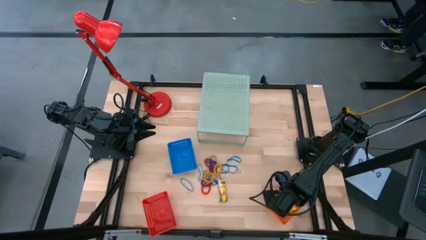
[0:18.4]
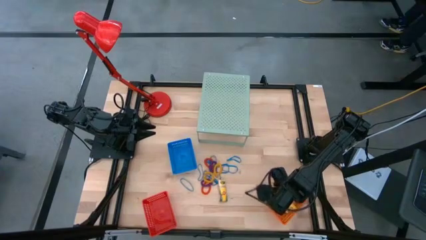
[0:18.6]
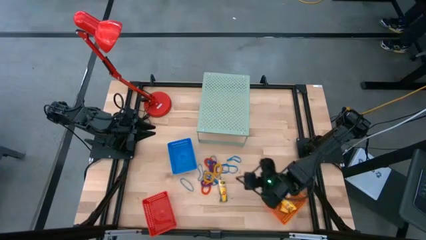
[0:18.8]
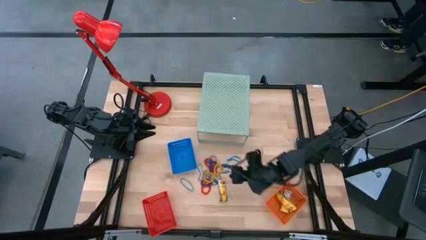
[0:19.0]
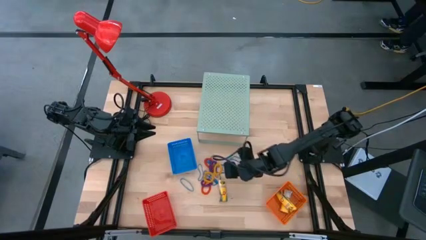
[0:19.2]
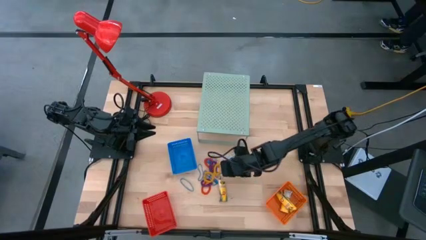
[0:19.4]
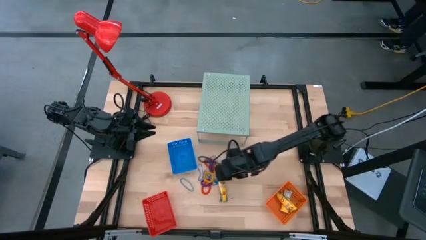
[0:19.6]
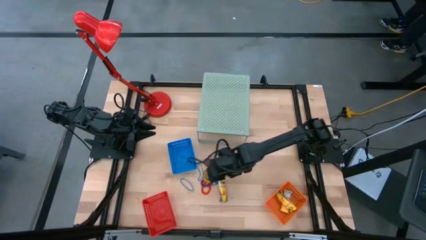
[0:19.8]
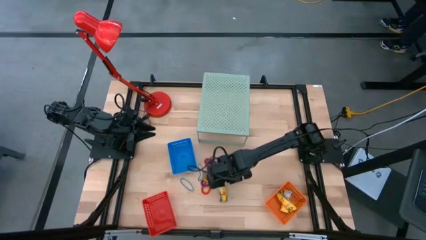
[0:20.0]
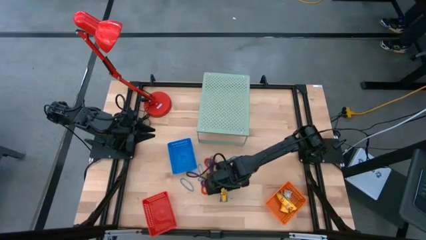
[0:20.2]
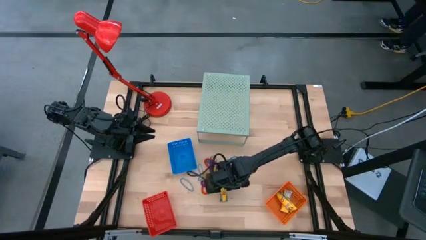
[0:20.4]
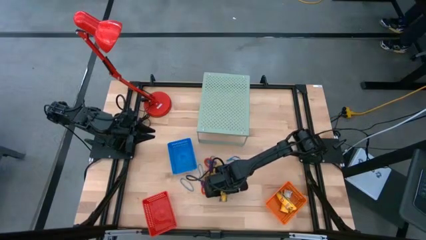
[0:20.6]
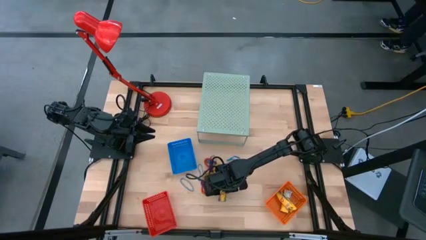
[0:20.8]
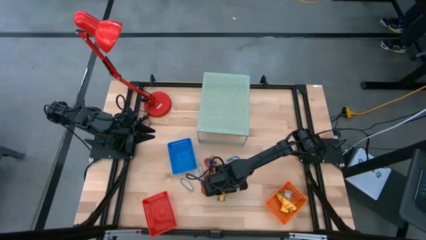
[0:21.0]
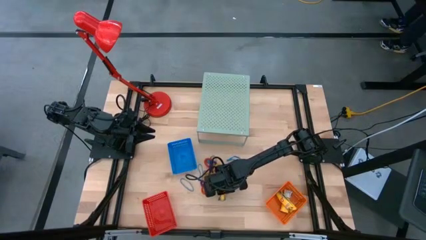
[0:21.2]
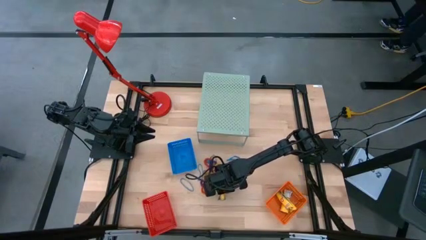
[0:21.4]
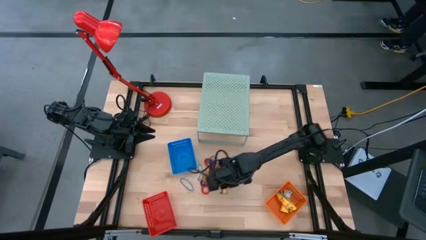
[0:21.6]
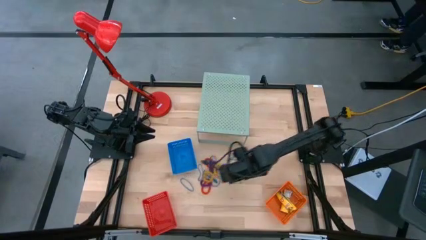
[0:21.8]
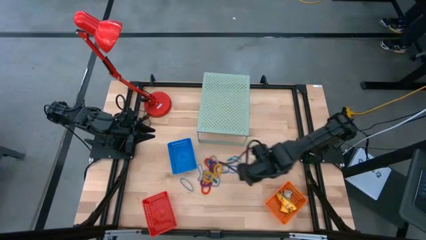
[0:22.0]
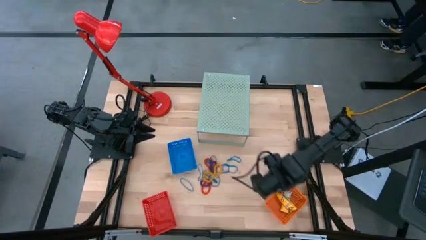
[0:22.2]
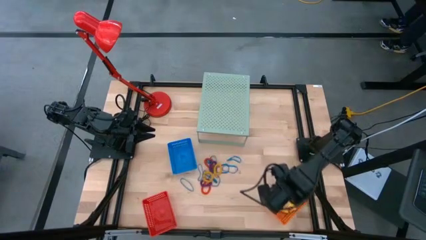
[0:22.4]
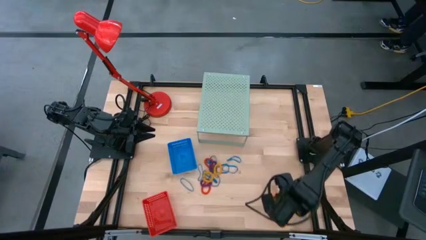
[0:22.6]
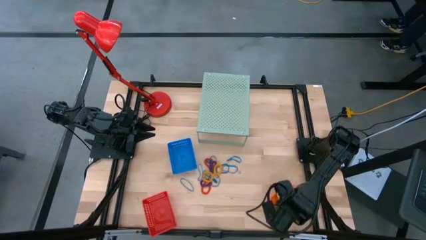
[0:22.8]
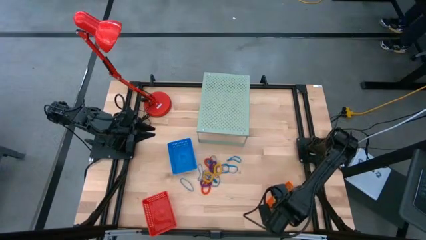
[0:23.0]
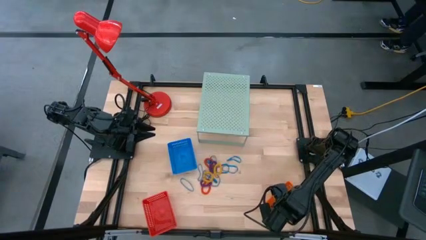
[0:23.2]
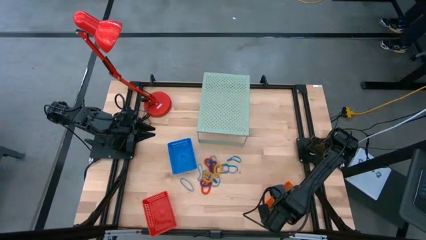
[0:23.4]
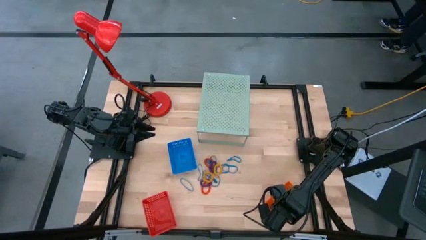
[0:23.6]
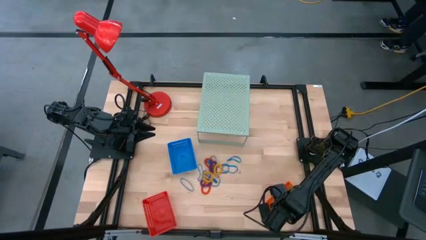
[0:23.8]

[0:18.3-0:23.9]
Task: Pick & Place Office Desk Supplies
Put the yellow crayon box into the orange basket

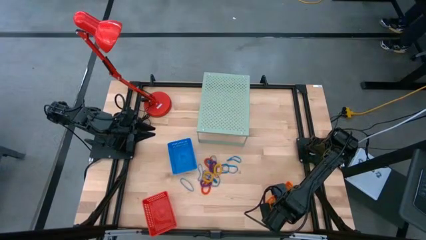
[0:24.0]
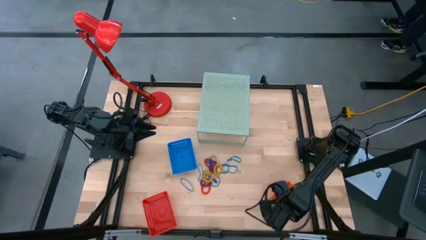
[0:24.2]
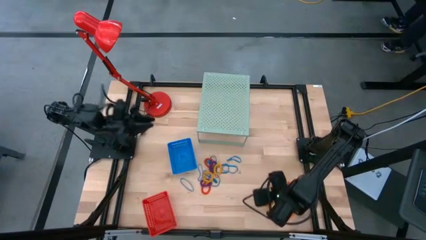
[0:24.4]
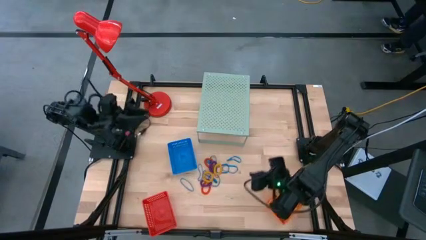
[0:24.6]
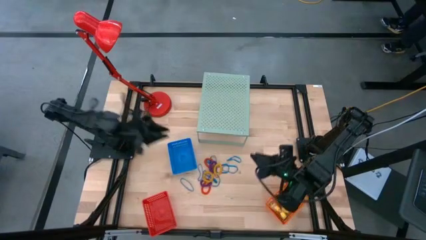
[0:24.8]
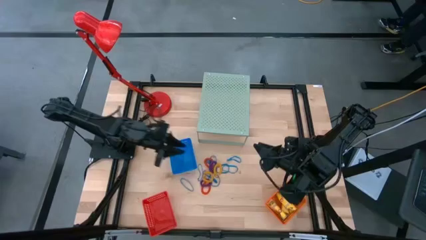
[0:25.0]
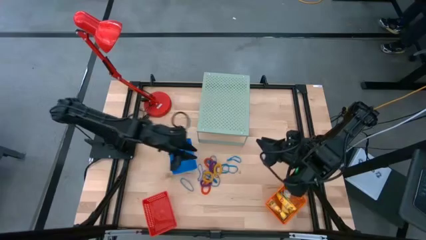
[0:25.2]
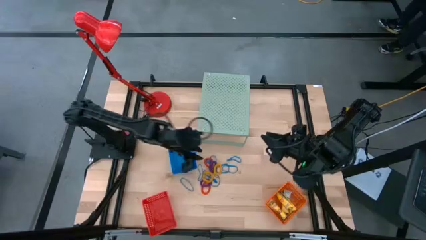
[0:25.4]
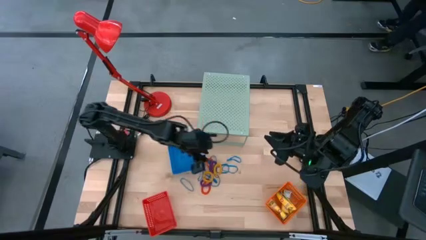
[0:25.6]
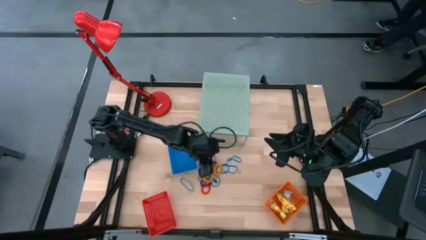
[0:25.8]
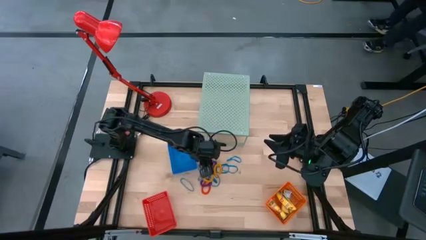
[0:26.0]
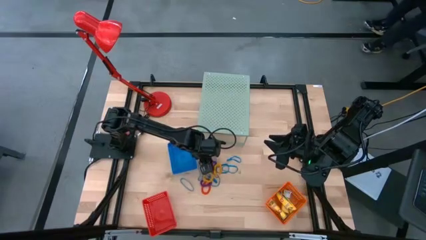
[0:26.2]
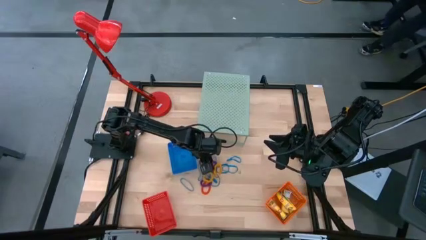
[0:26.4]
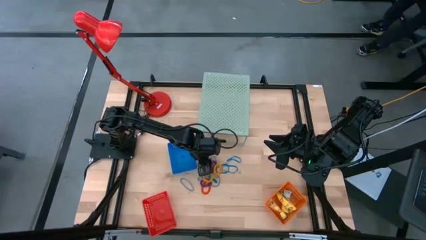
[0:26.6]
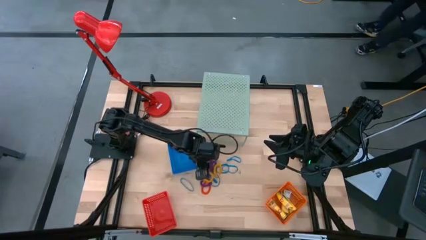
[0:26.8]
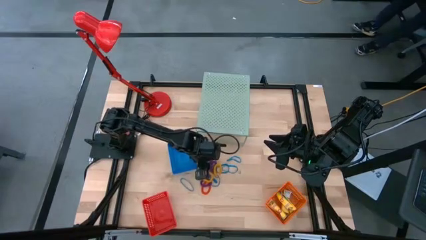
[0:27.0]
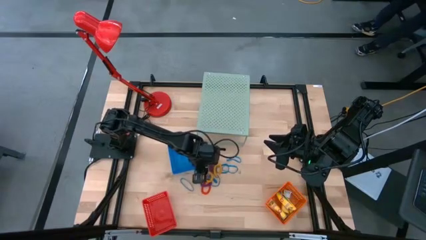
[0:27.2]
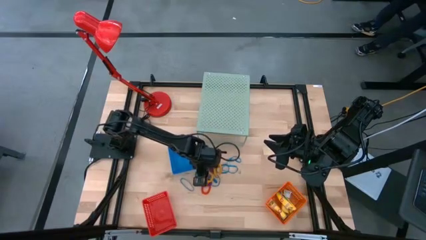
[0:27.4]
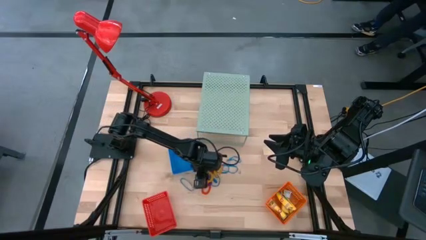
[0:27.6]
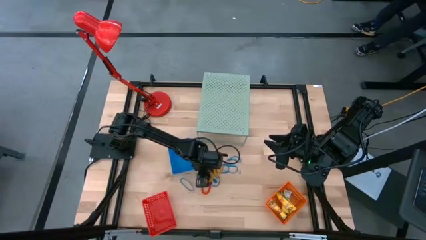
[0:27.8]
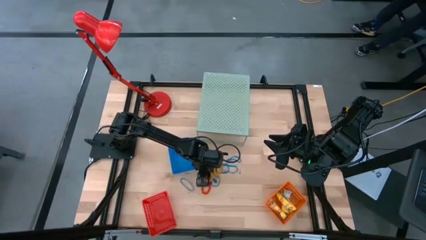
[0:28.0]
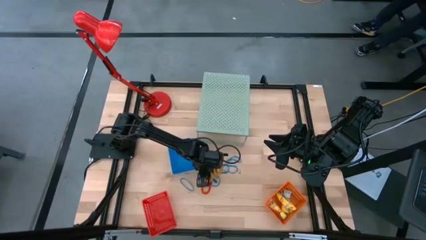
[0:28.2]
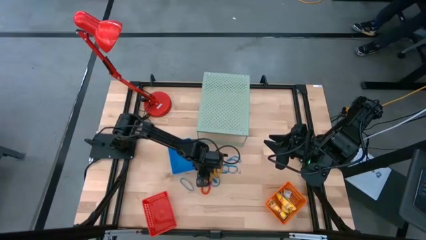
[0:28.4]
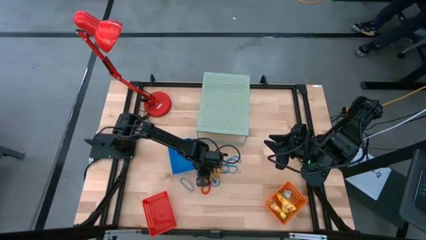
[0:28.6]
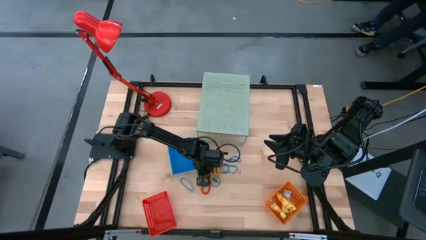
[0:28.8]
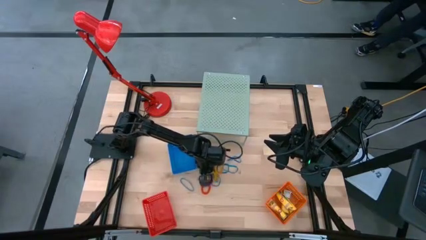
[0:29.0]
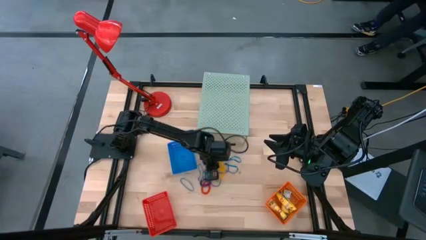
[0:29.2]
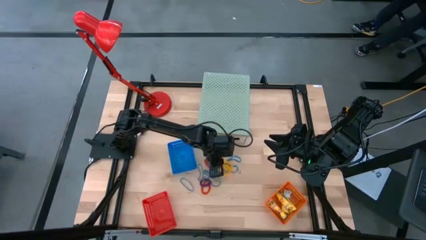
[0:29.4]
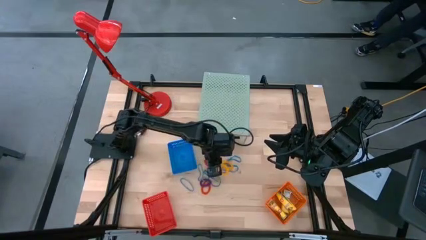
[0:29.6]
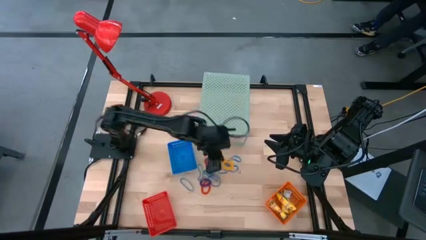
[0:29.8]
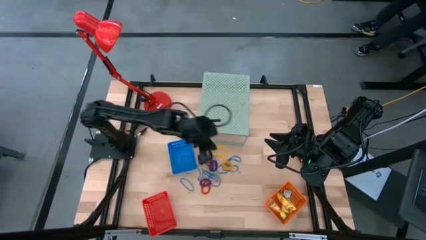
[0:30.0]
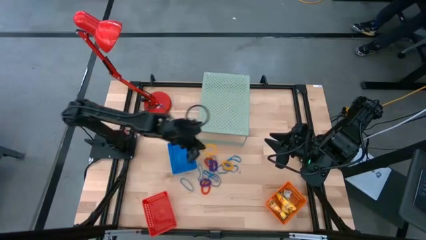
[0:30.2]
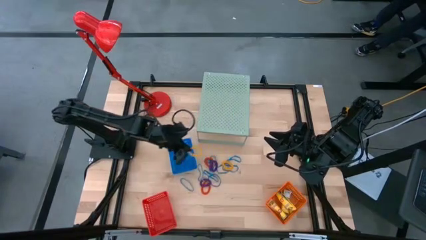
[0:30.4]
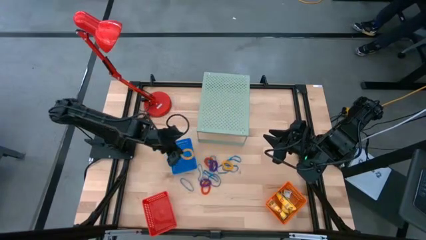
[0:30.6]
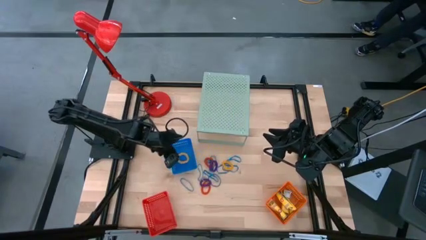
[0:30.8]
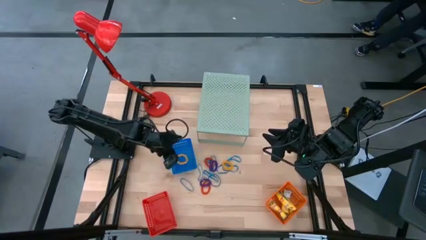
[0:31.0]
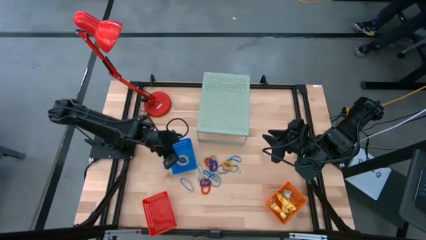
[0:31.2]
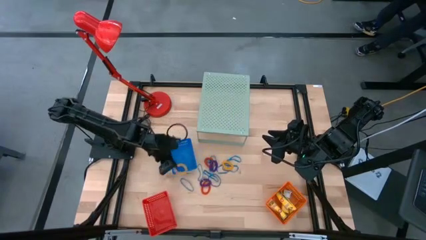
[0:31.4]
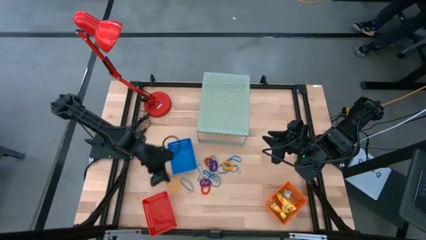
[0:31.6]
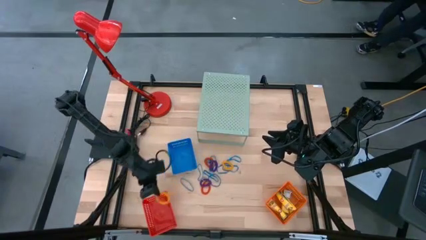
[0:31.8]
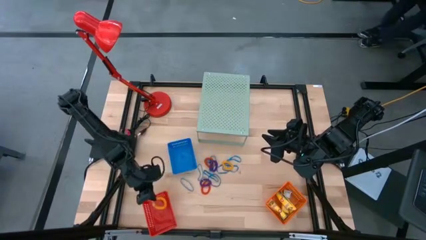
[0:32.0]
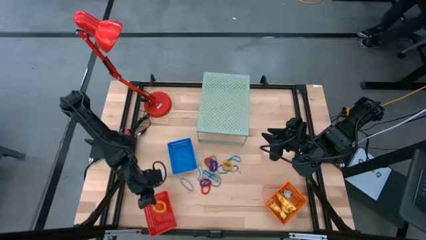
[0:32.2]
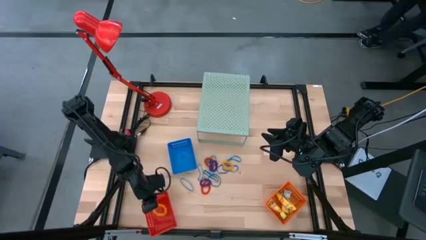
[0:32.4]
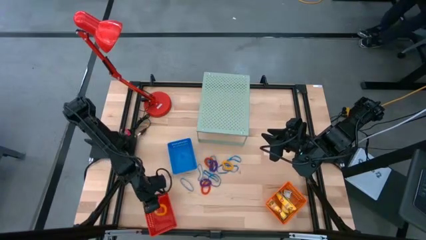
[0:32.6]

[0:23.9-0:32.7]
Put the yellow spring keychain into the red basket

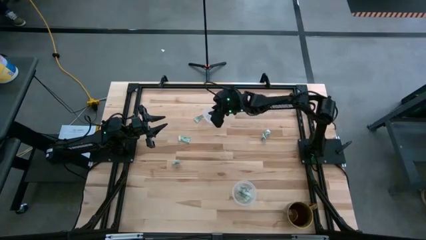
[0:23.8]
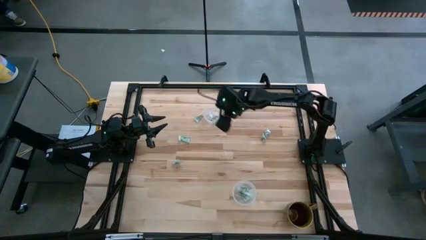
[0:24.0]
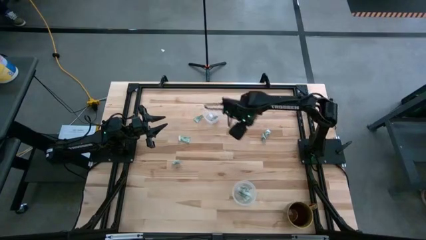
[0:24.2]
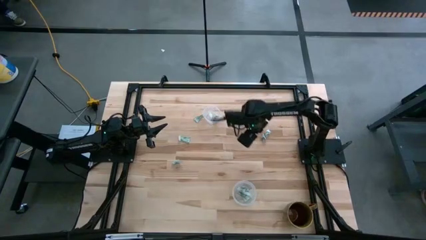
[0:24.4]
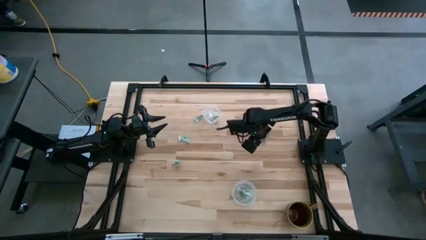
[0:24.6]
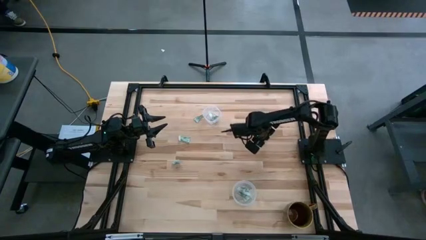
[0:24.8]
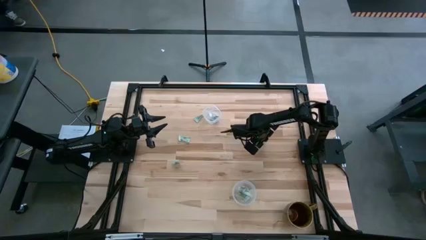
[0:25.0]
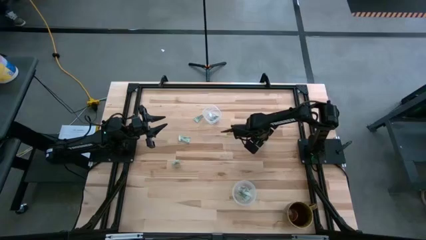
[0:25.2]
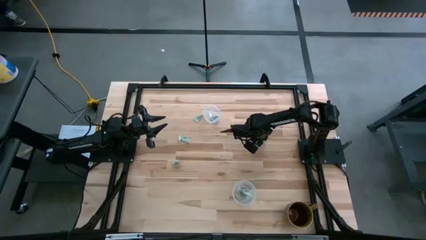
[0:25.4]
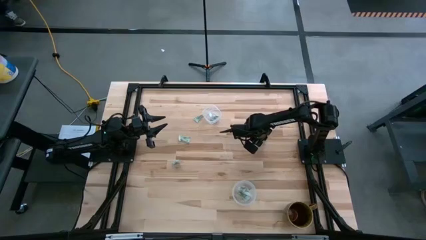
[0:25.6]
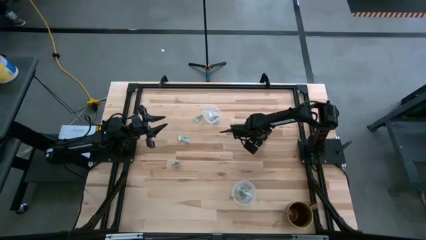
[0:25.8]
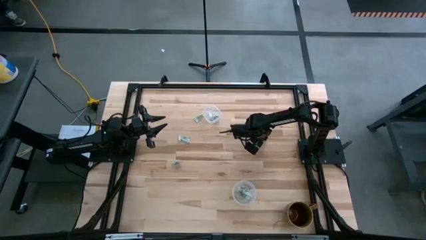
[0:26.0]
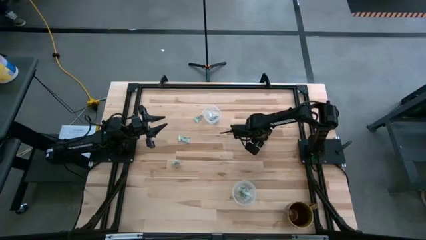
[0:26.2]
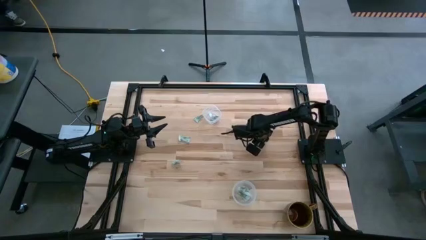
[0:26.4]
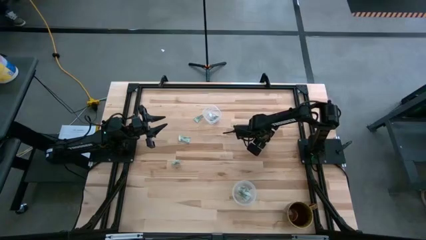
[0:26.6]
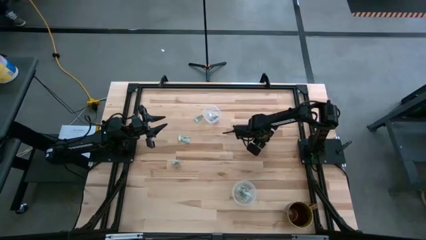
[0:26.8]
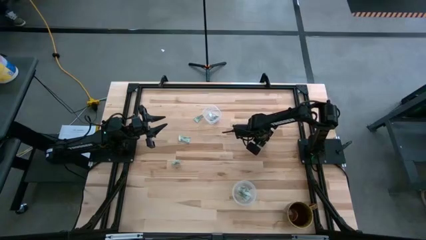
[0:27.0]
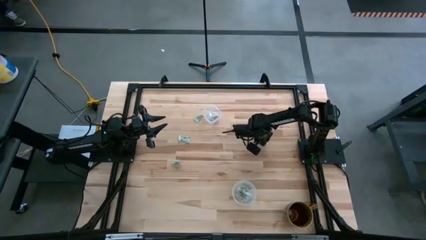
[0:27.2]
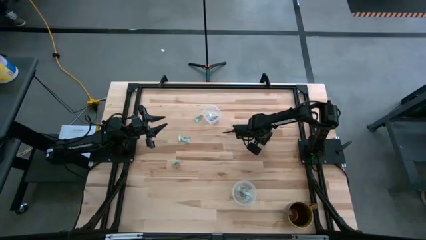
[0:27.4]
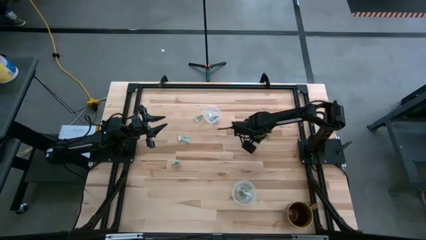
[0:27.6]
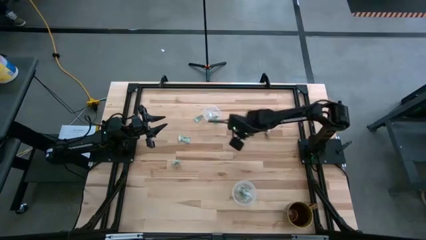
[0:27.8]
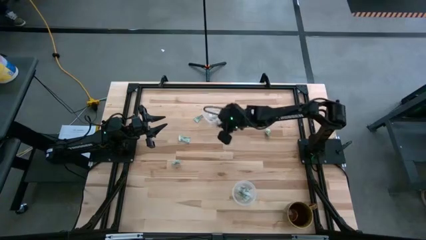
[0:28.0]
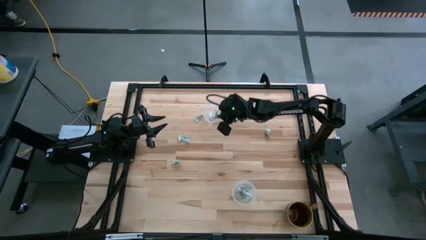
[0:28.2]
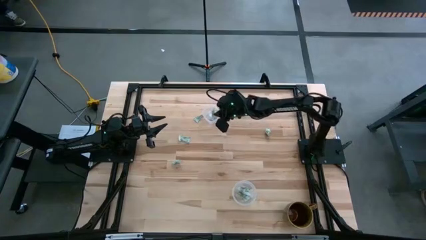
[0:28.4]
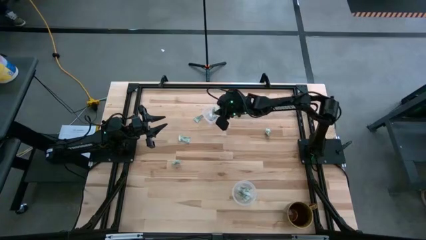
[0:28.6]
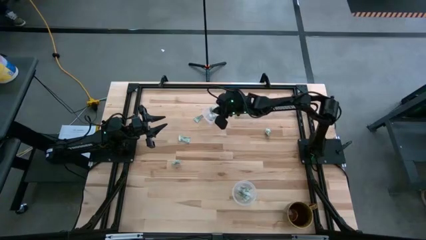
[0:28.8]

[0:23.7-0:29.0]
Task: Pick and place Stevia / Truvia into bins
Put the stevia packet into the top transparent container
